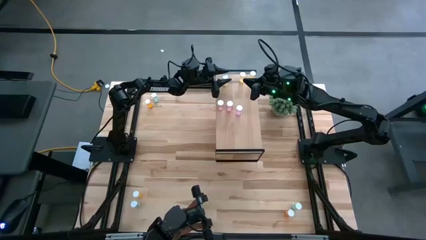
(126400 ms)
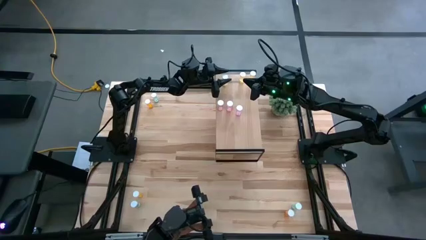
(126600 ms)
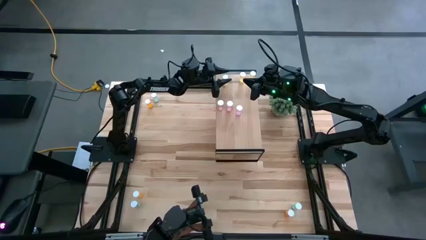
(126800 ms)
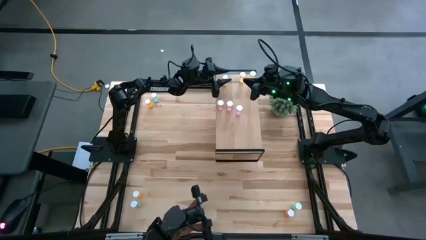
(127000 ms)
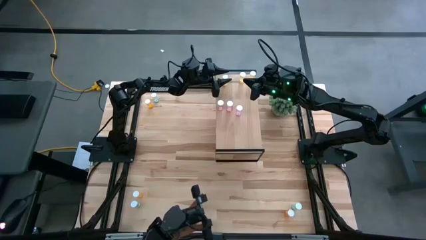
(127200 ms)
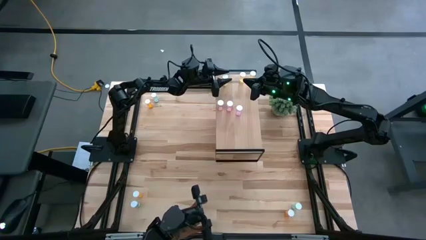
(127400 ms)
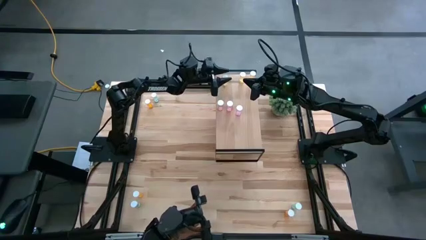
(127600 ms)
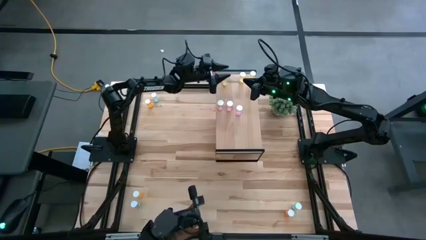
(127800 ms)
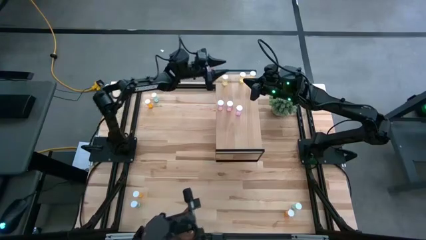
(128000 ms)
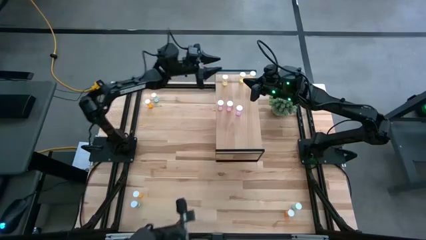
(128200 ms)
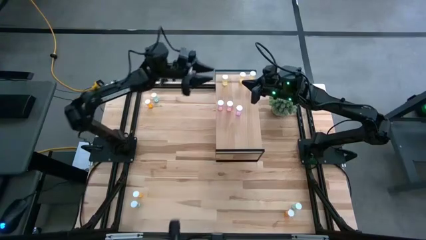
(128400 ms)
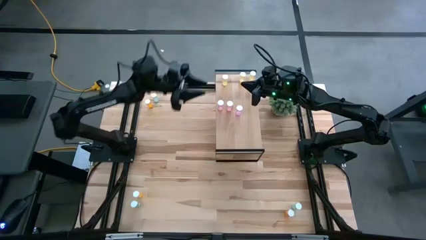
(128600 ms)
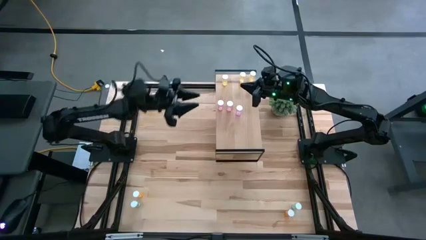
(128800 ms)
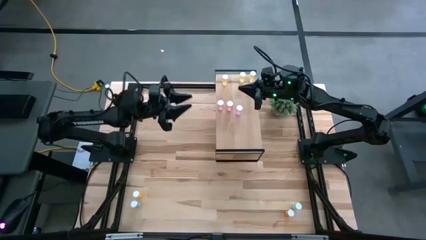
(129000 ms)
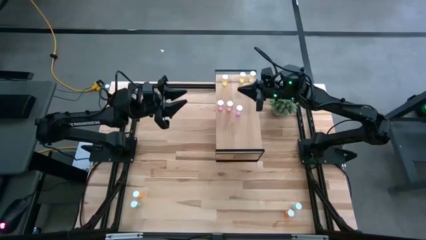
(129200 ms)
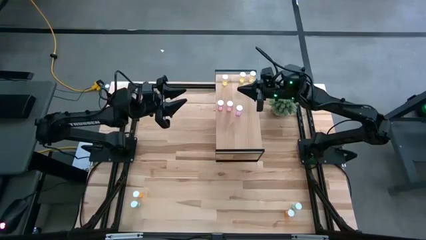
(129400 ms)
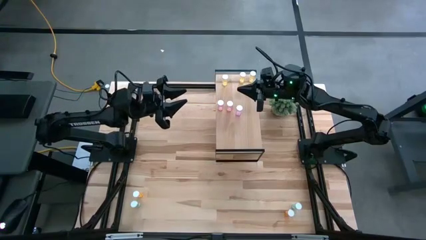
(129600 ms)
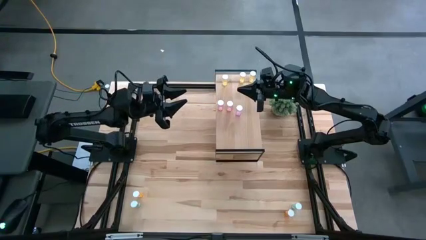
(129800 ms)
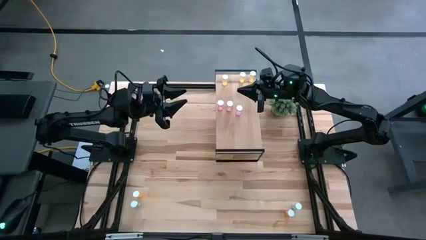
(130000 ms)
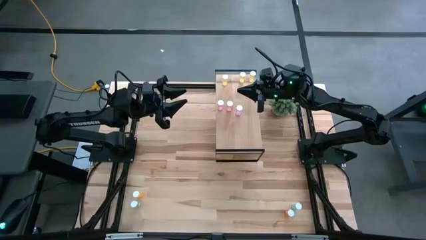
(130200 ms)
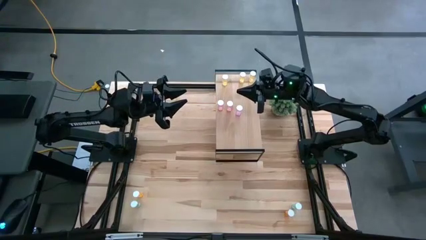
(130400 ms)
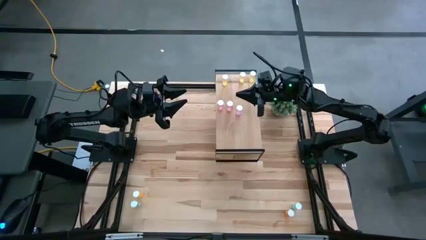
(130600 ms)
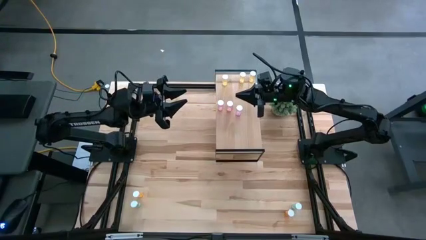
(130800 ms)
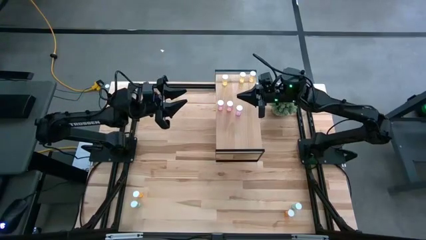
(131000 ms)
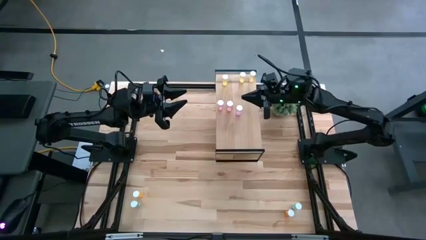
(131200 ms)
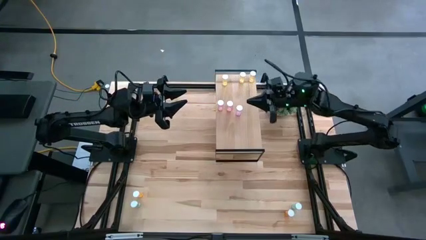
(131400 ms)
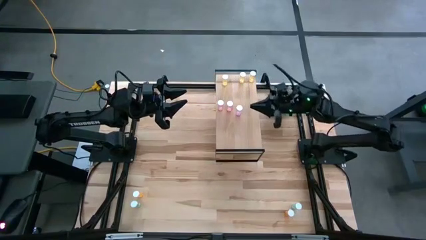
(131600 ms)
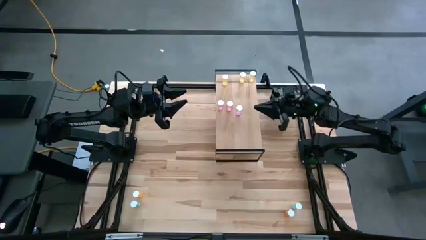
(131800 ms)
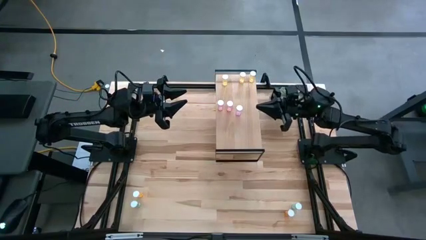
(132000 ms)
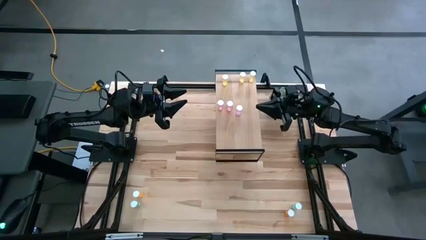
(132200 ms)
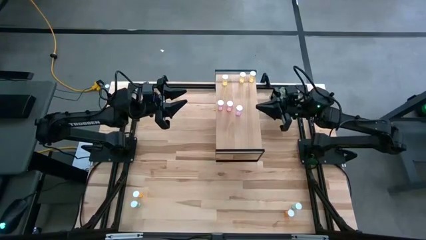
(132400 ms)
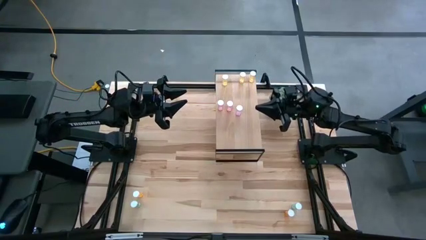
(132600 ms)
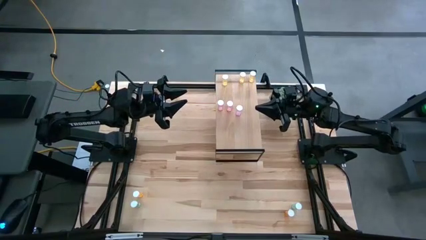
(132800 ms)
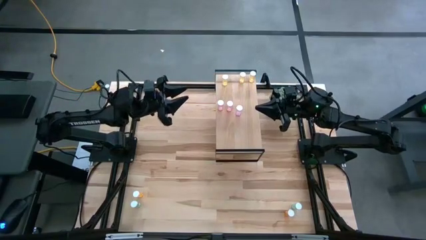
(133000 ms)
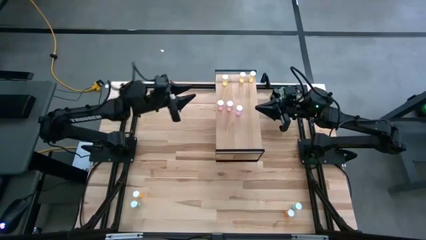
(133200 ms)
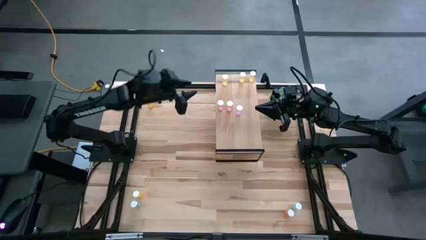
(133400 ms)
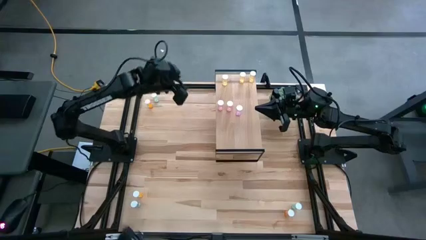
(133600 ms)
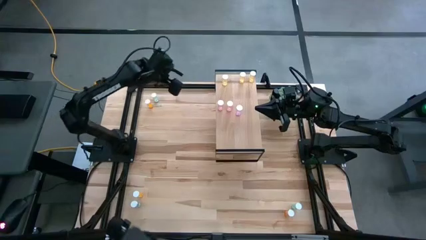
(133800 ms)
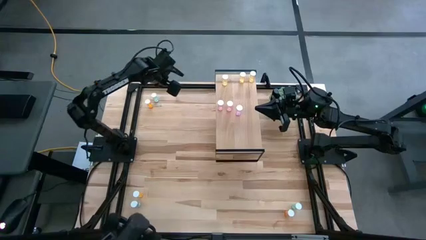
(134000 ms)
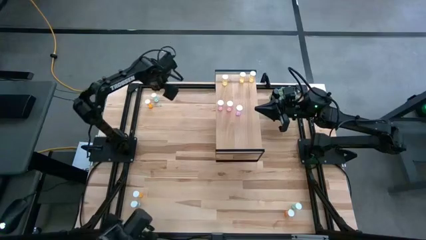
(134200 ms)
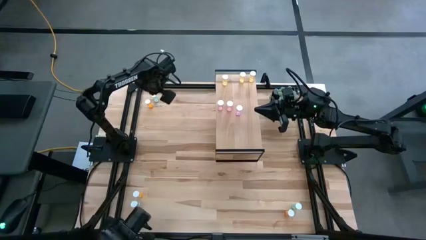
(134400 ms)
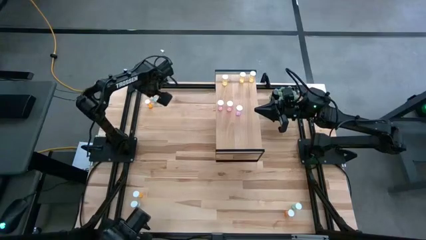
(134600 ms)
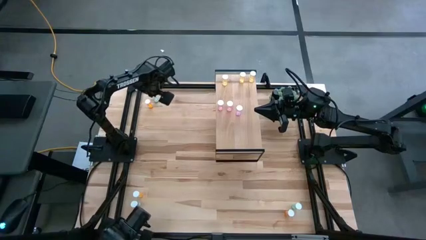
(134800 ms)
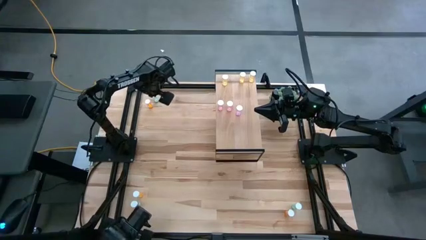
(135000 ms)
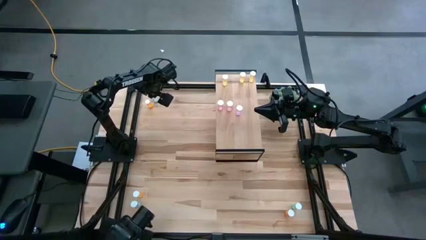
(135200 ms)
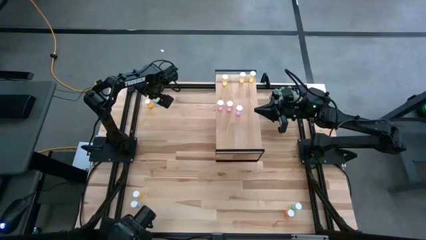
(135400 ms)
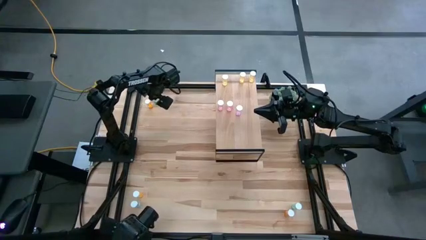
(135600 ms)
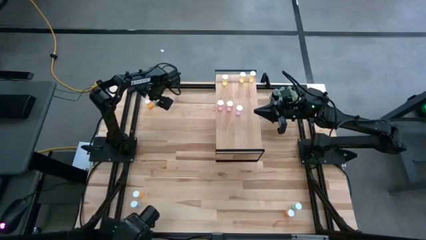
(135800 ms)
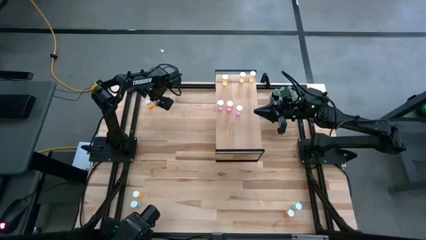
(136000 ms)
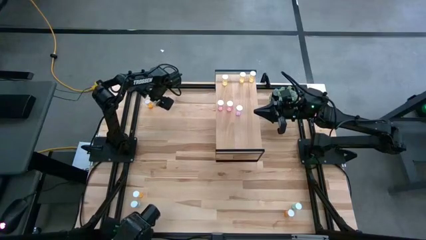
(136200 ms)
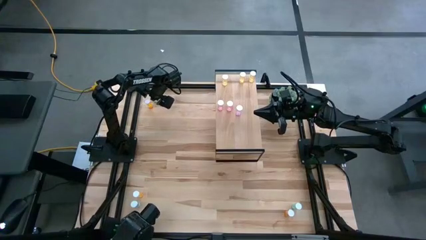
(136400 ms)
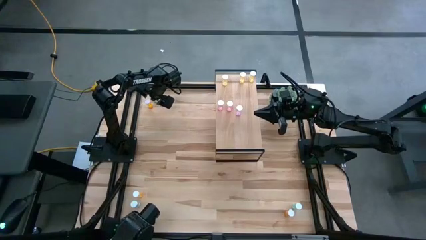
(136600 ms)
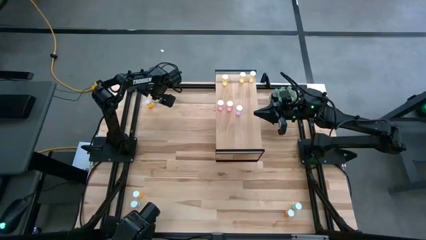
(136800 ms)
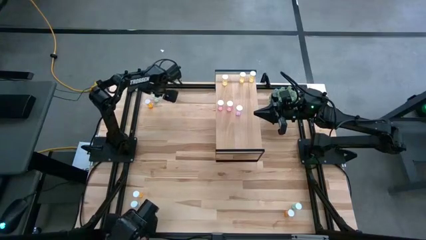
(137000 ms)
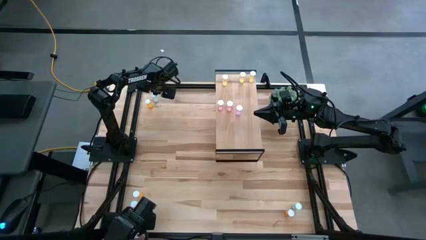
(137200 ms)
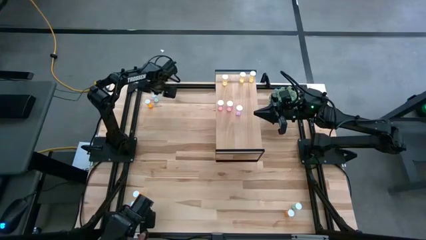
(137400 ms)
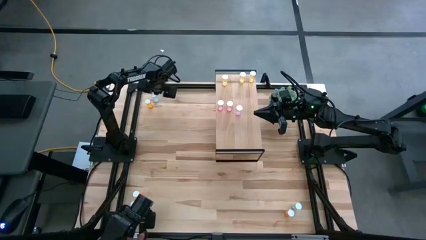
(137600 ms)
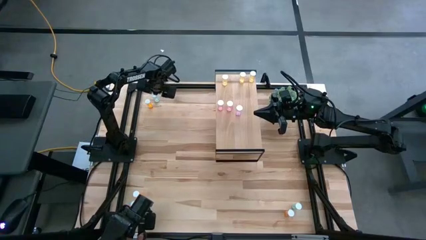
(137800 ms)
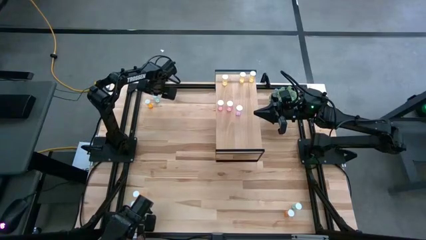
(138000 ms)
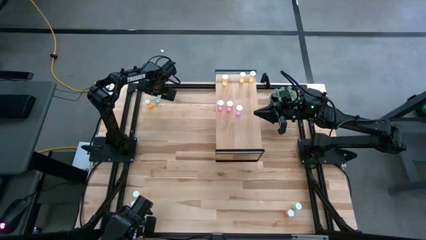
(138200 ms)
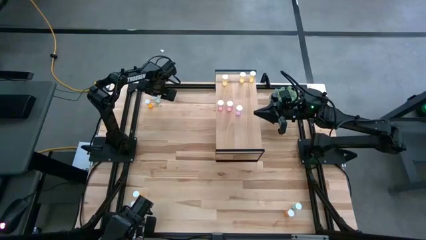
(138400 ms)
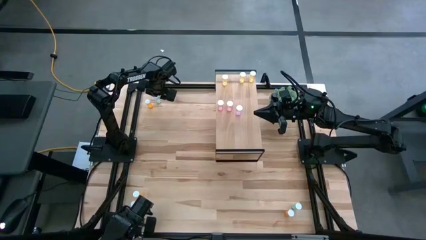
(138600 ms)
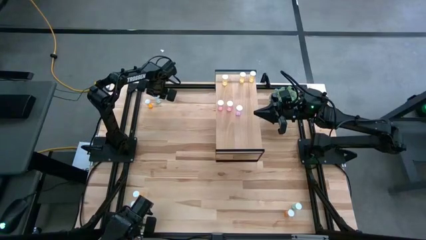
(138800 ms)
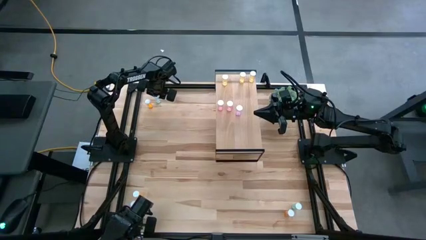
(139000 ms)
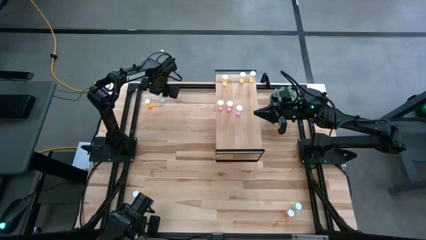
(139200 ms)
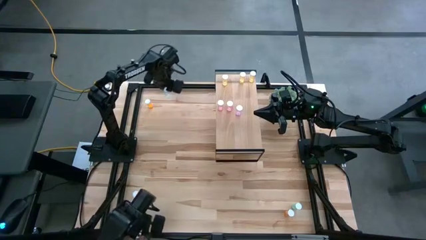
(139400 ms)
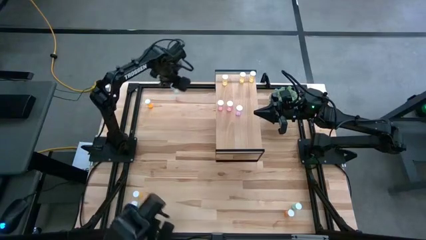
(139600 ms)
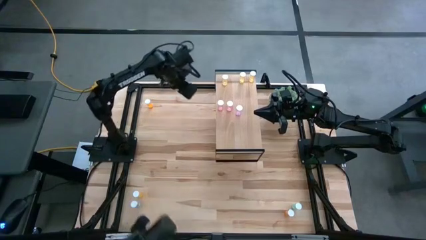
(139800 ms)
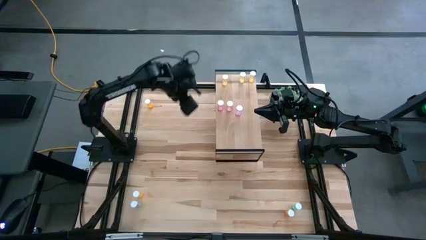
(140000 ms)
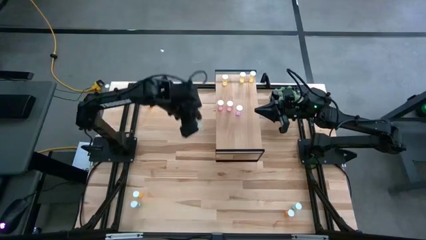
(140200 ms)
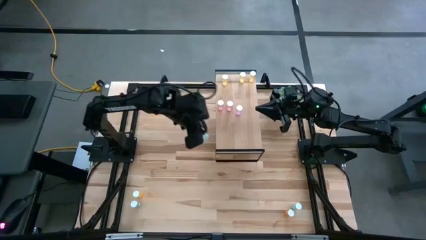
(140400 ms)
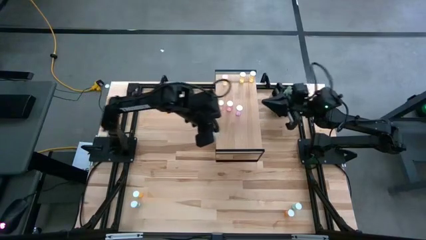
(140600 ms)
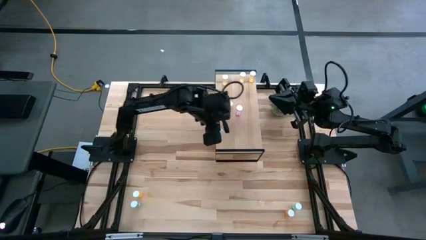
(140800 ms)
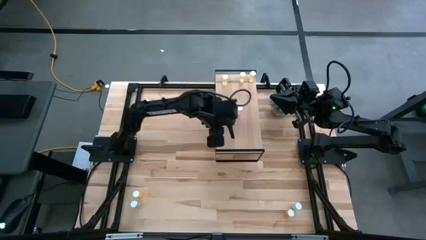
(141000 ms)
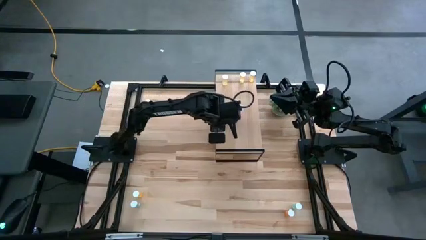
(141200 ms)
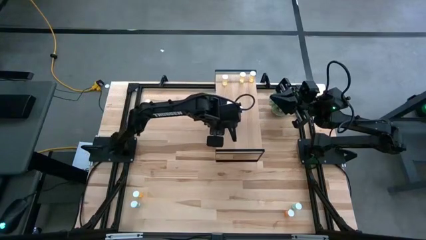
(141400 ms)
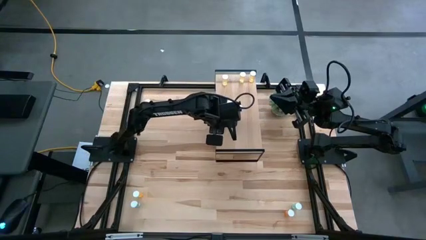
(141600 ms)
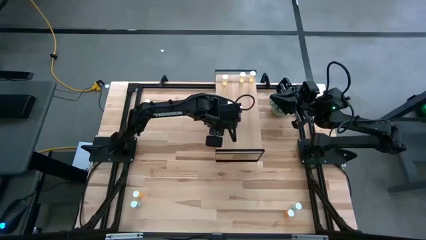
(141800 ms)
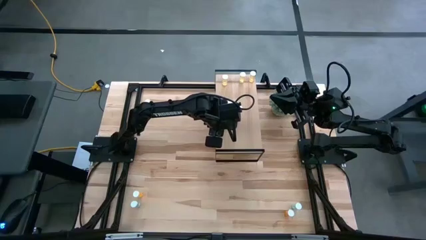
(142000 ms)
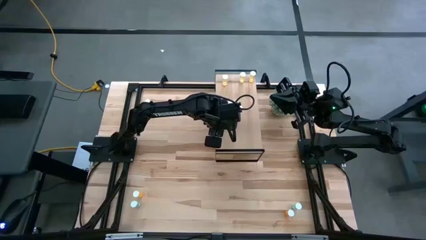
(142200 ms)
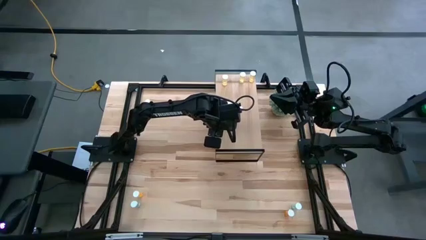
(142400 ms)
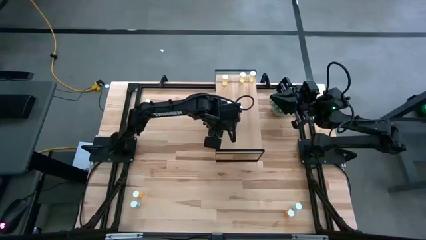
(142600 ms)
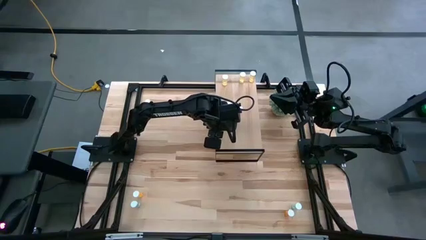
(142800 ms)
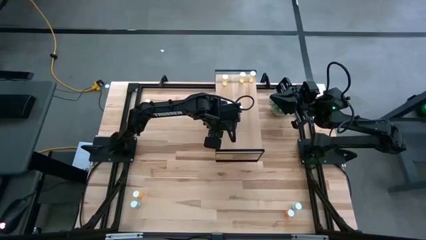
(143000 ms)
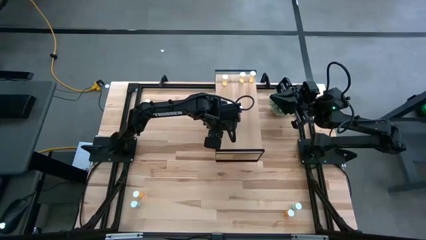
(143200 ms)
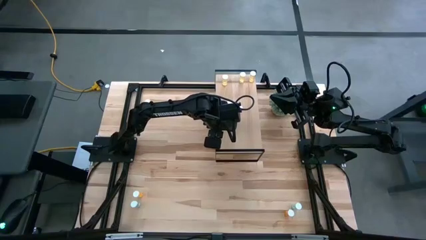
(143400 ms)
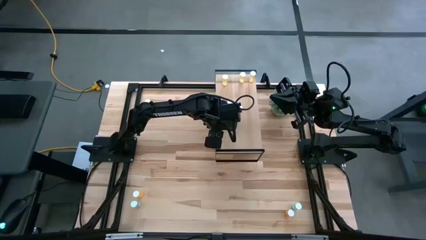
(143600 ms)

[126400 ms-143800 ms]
Task: Pick and place medicine bottles onto shelf by color
Put the top blue pill bottle on the shelf
